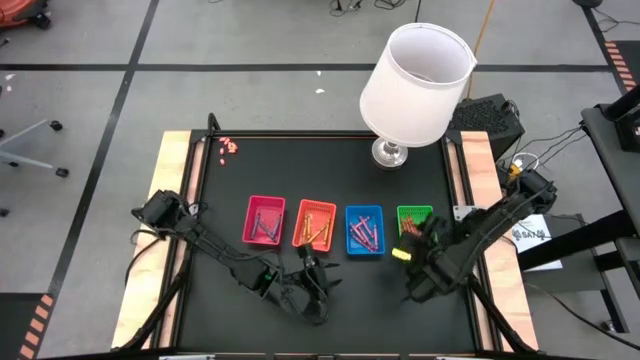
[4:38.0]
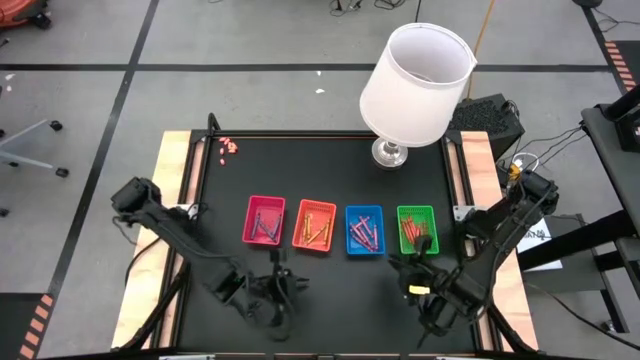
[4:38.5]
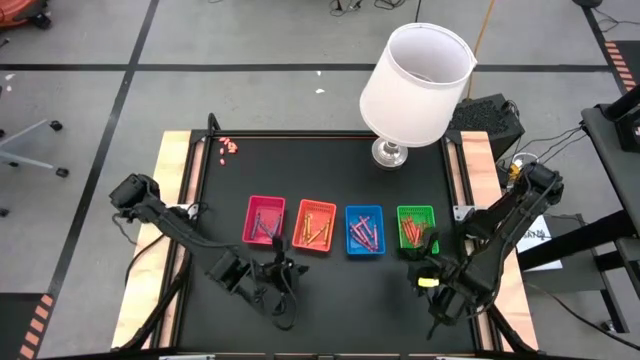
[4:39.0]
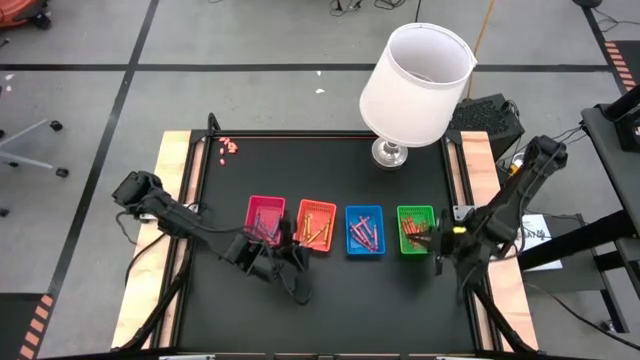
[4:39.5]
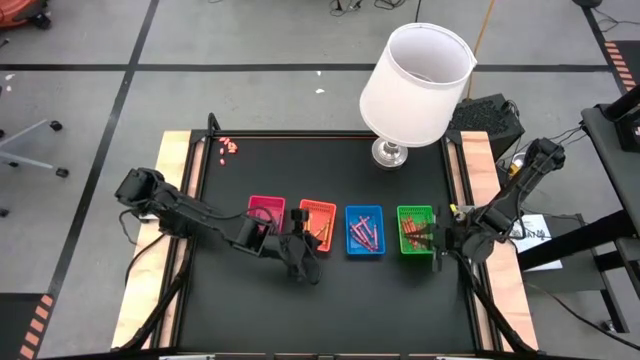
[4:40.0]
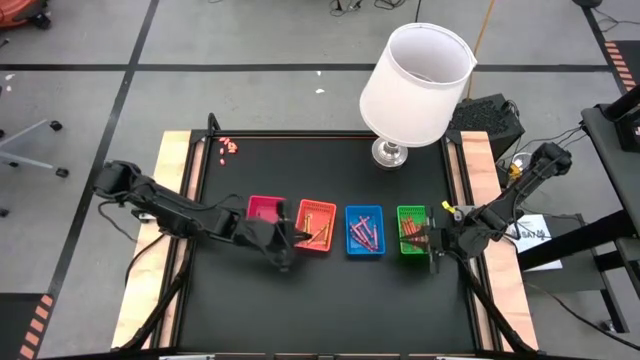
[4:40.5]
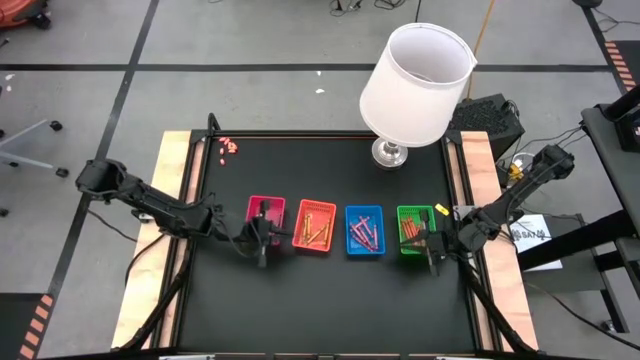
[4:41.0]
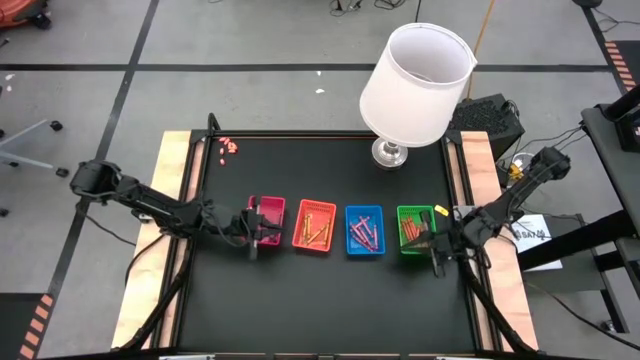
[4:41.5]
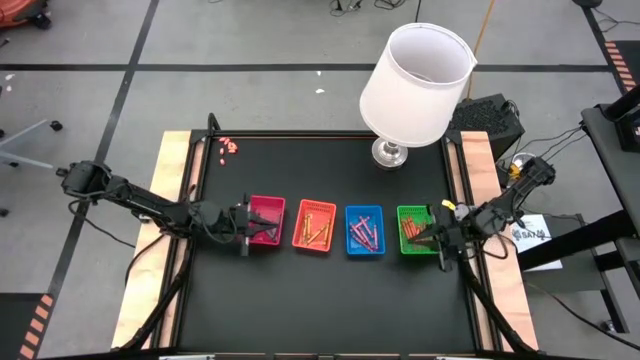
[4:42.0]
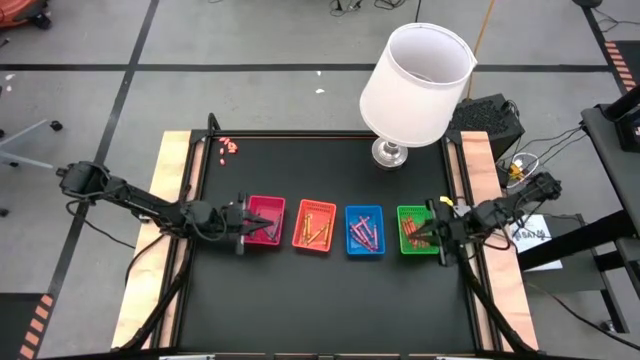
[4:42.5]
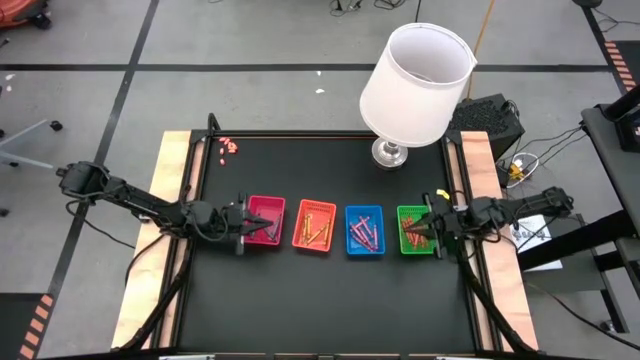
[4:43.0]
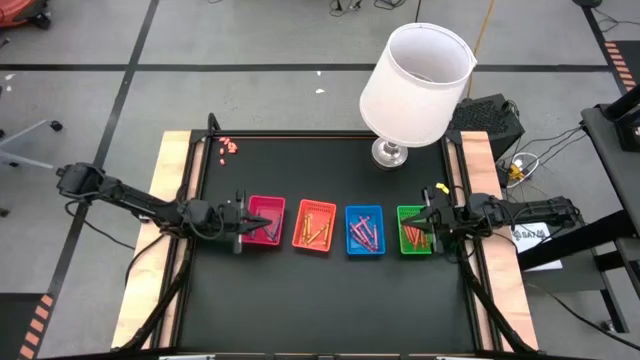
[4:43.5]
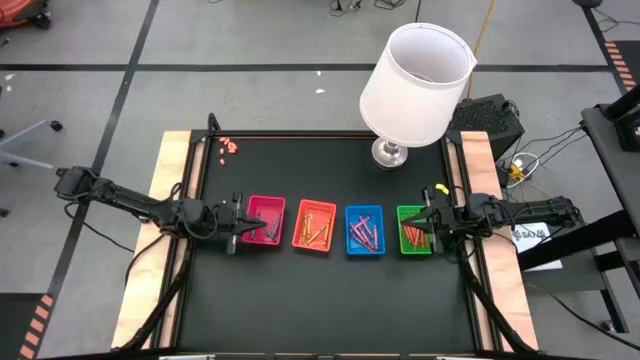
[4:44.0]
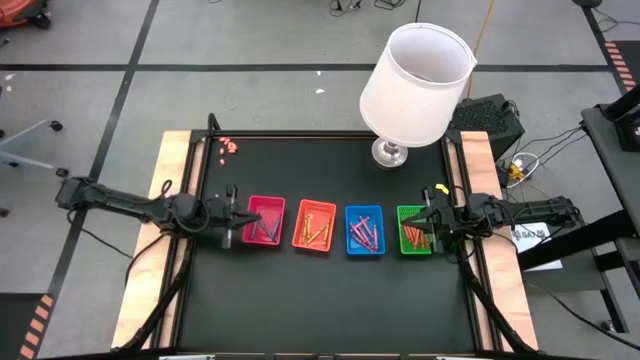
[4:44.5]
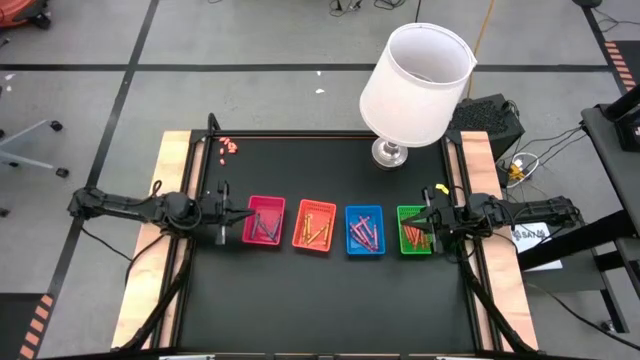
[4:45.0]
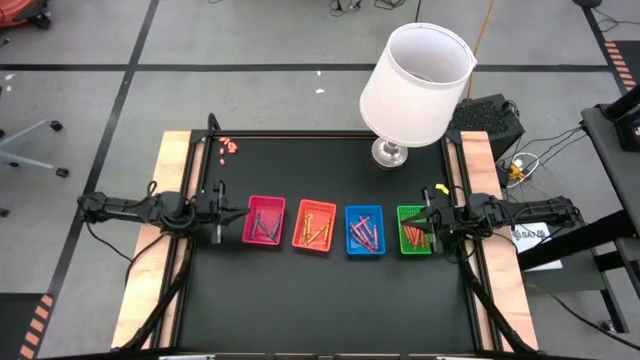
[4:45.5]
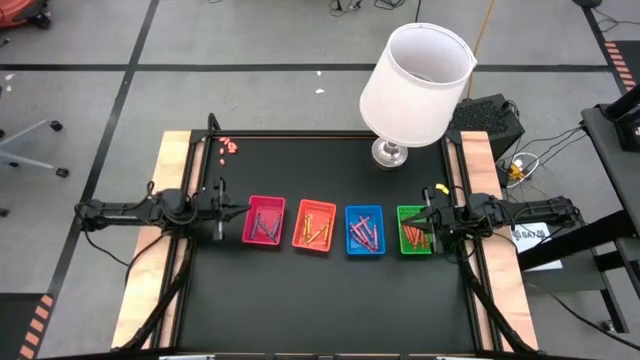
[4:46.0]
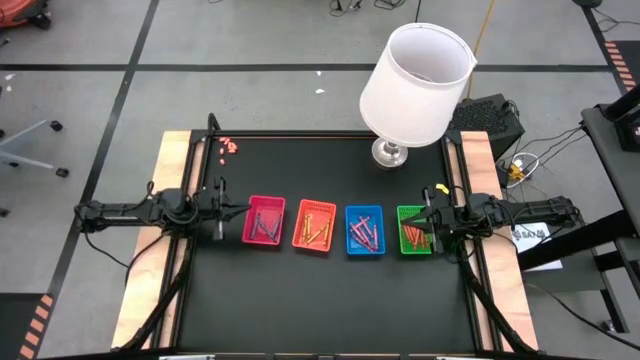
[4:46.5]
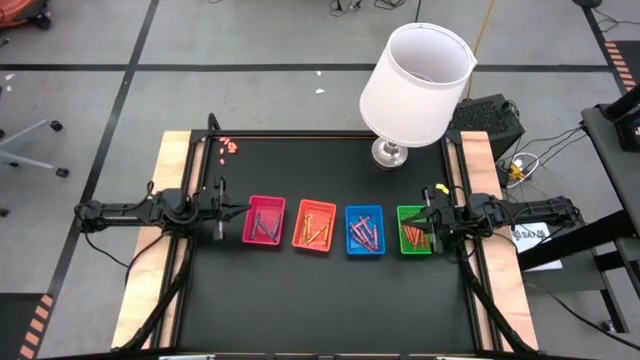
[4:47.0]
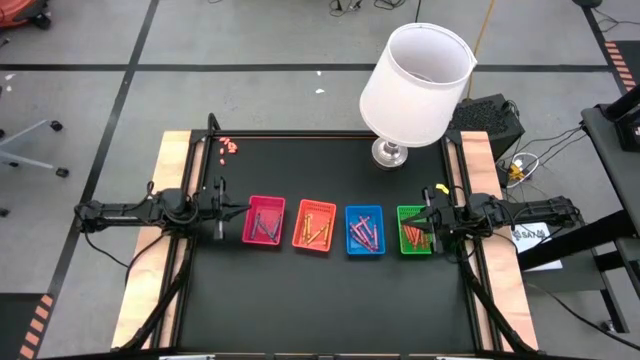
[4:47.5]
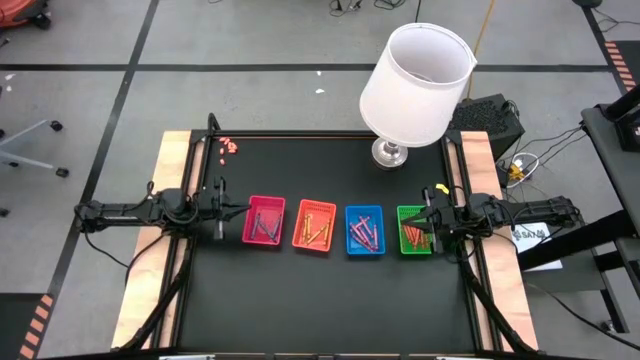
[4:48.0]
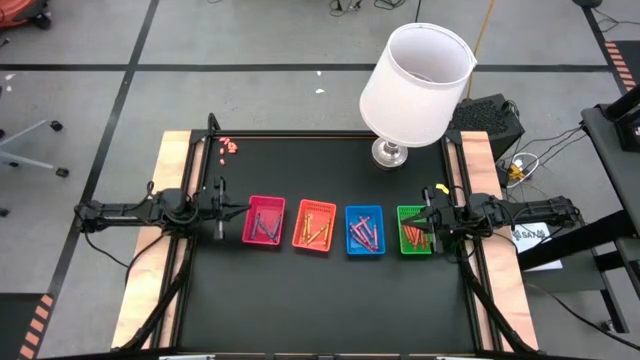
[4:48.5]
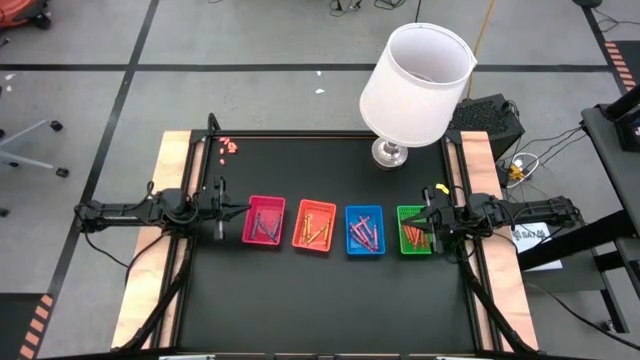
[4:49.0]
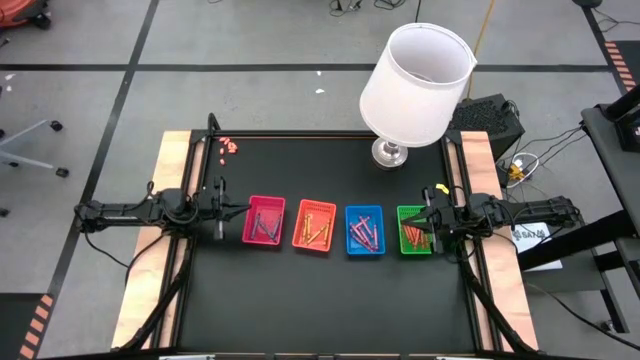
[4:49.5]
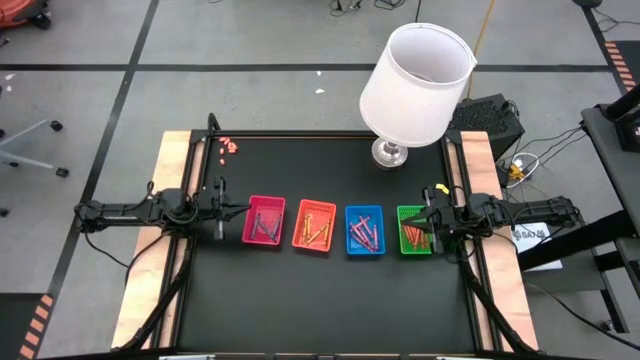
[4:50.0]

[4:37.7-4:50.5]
Task: Sort crayons
Return to Home Position

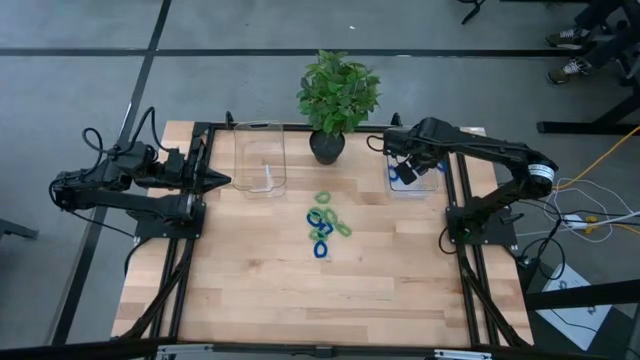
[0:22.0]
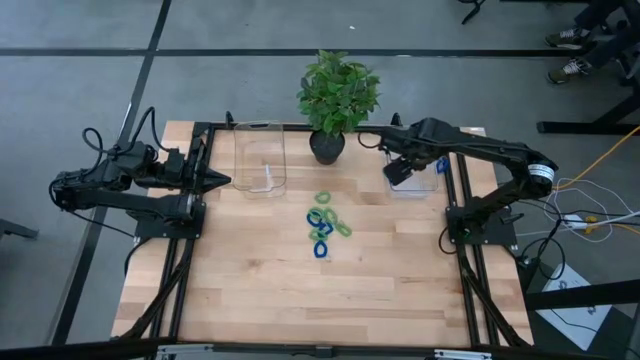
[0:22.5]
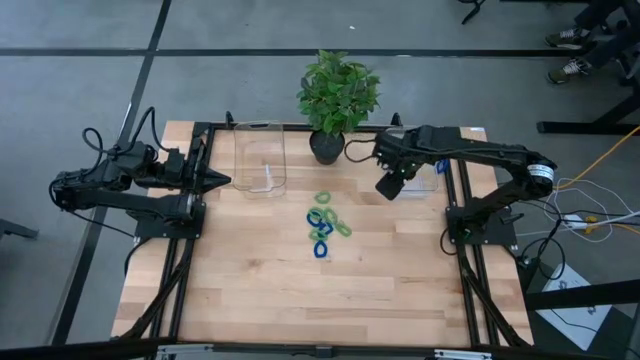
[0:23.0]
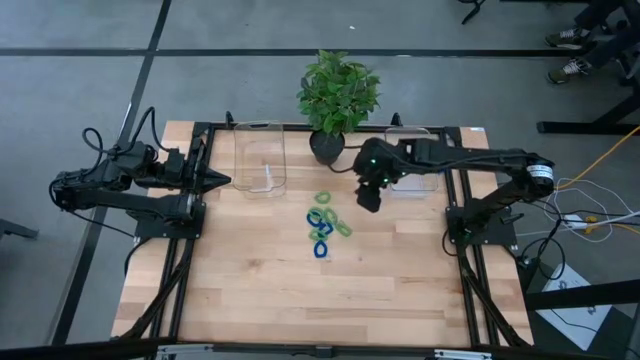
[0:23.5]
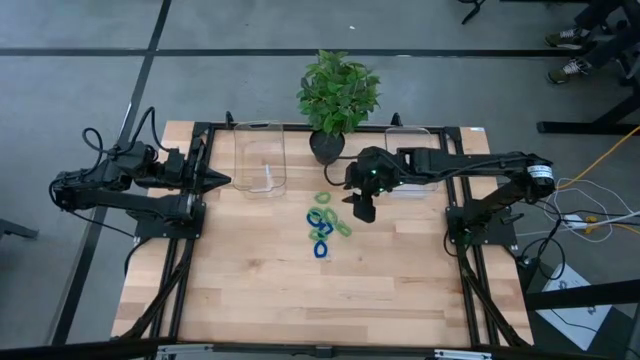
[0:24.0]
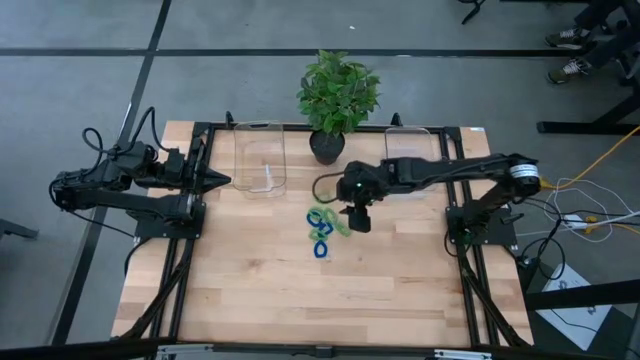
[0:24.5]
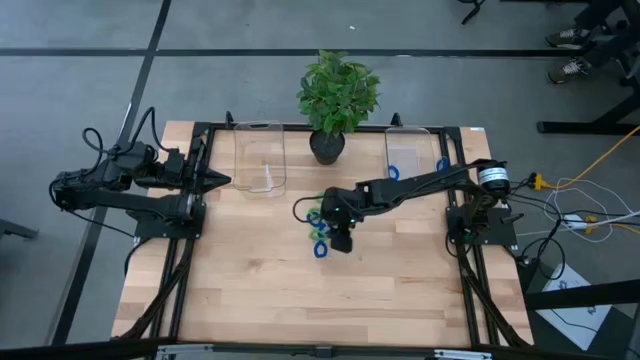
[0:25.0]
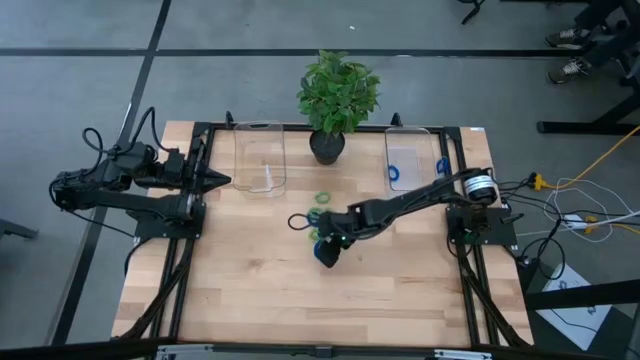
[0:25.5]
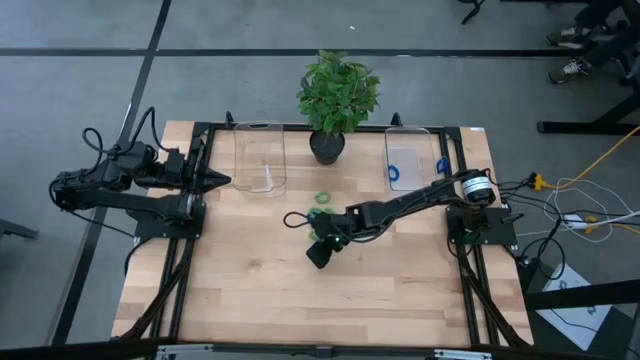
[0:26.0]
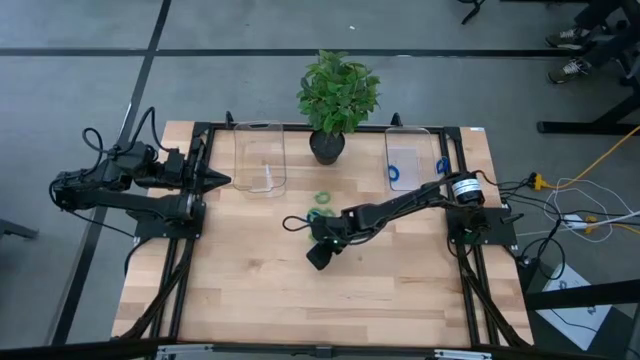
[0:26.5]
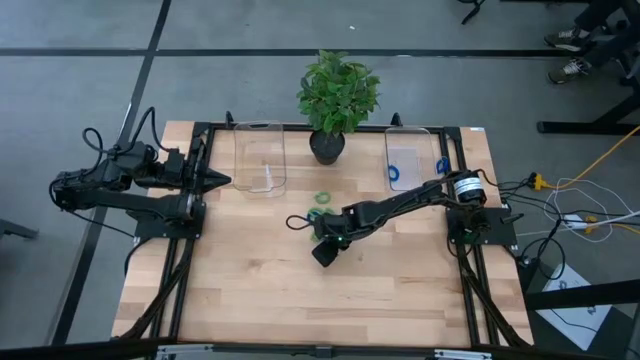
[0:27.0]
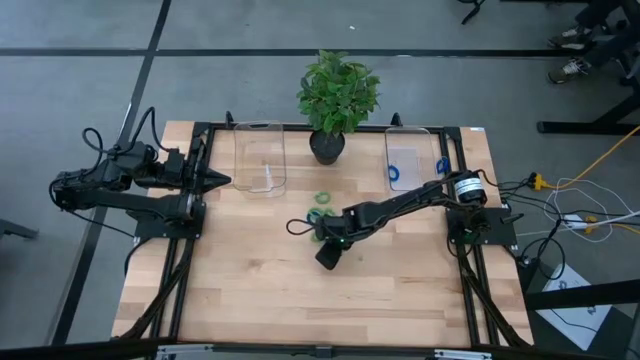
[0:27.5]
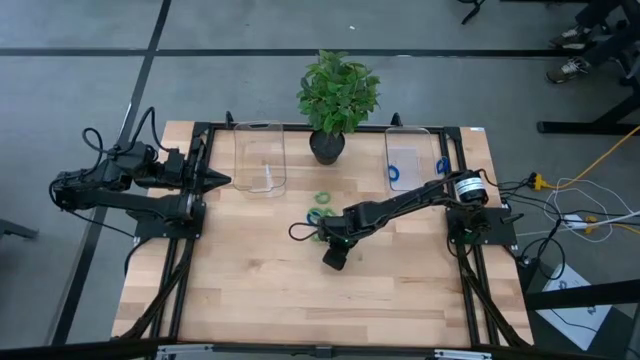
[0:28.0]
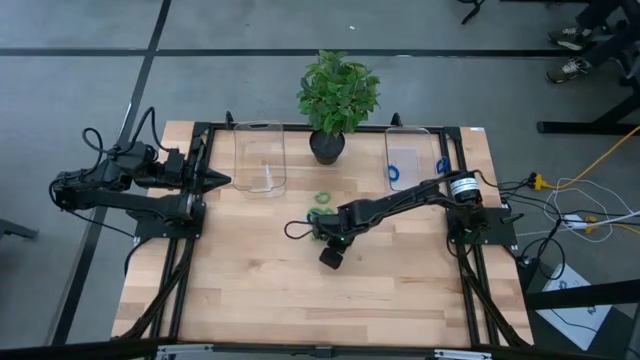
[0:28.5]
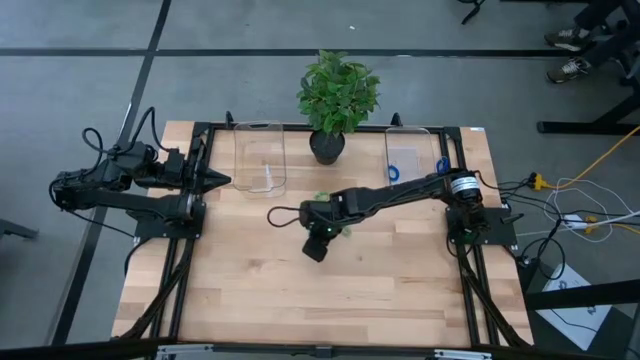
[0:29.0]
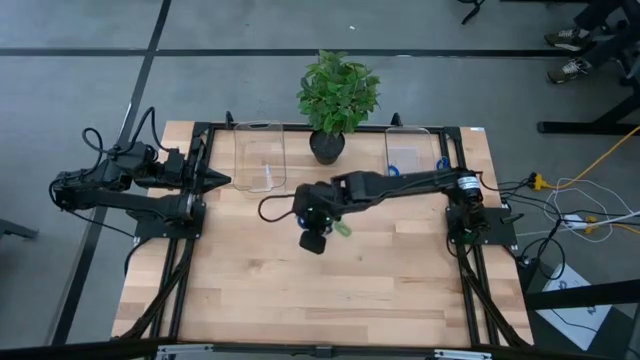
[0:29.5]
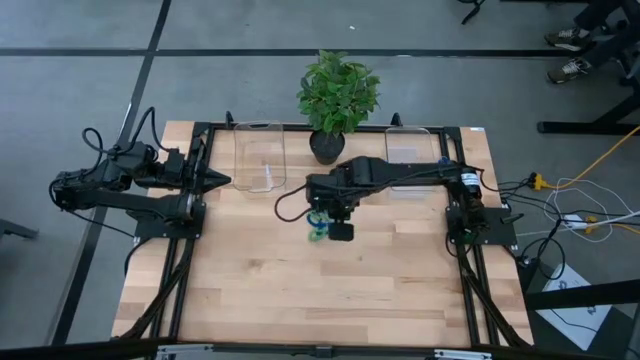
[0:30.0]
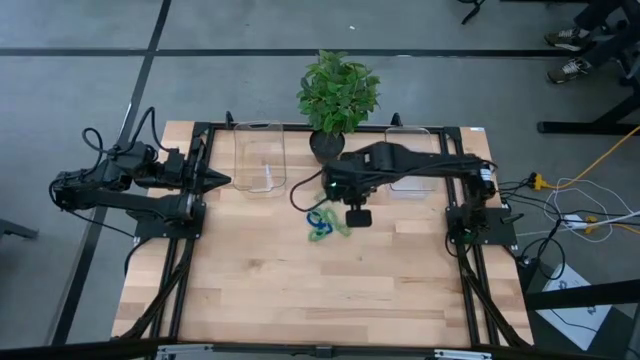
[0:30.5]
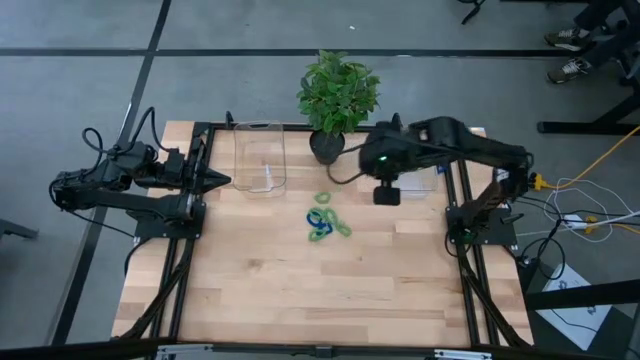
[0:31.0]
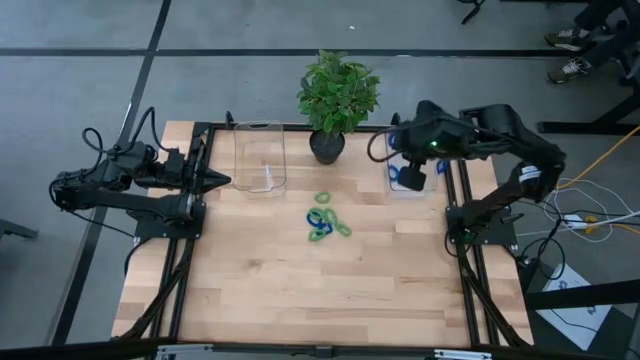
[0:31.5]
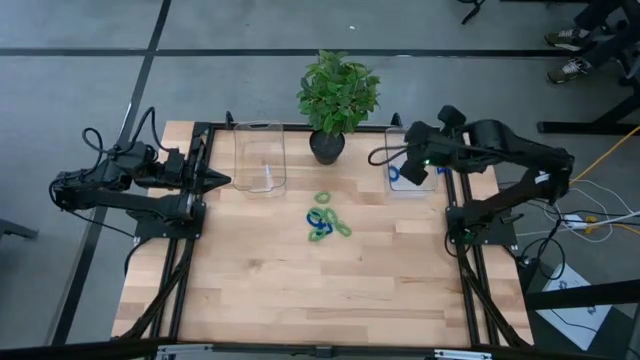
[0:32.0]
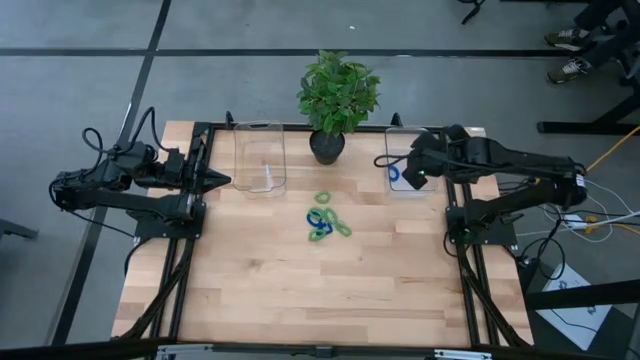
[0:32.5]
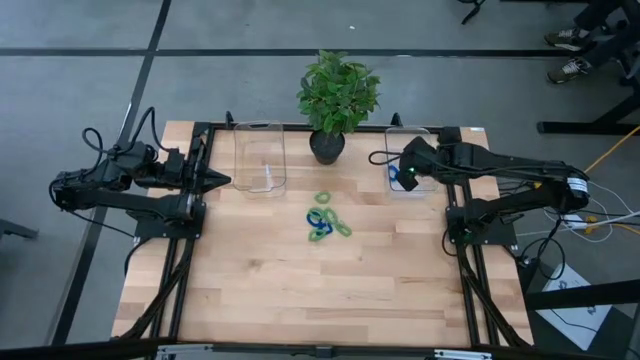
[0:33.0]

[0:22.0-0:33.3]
Task: Sort spring keychains
Put the blue spring keychain into the right transparent bin
